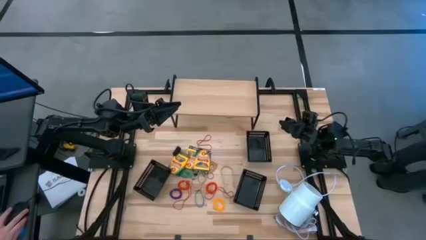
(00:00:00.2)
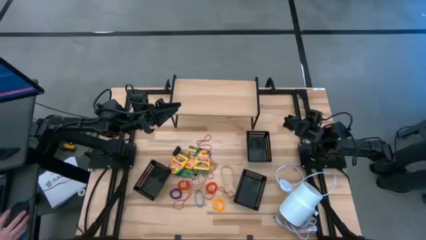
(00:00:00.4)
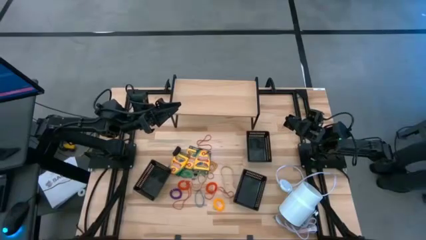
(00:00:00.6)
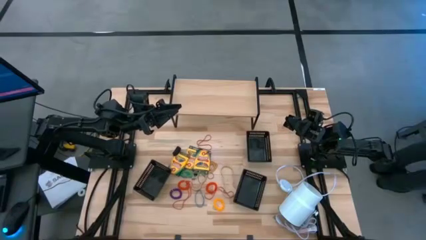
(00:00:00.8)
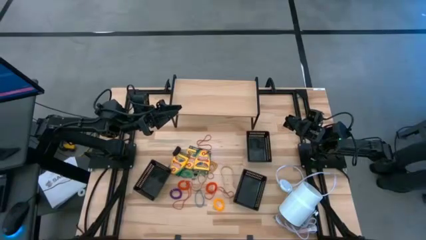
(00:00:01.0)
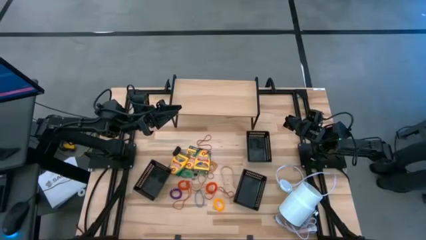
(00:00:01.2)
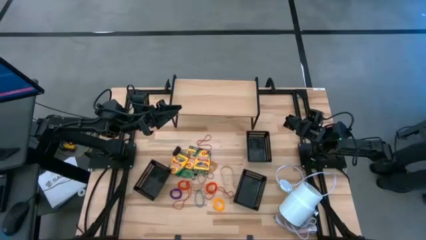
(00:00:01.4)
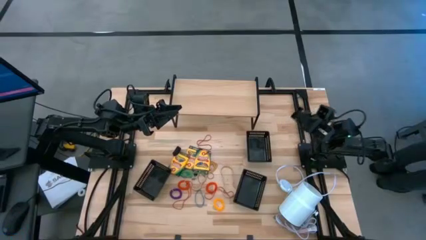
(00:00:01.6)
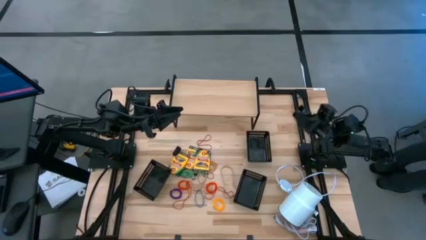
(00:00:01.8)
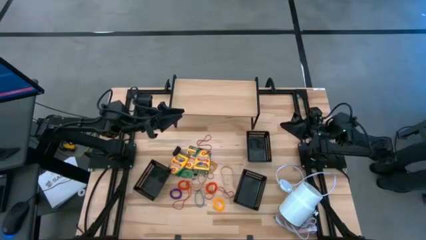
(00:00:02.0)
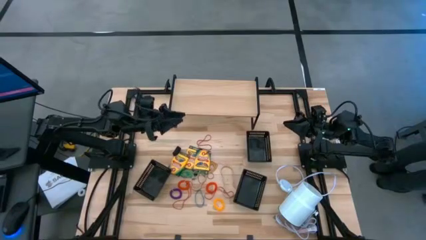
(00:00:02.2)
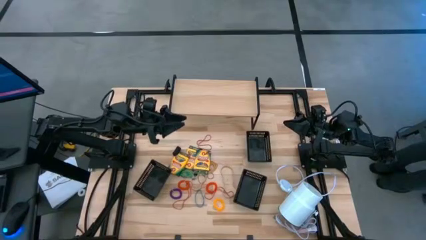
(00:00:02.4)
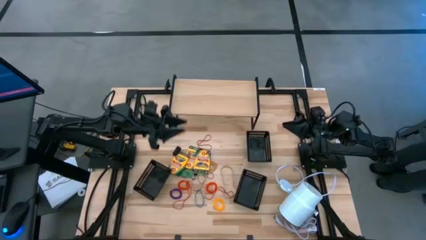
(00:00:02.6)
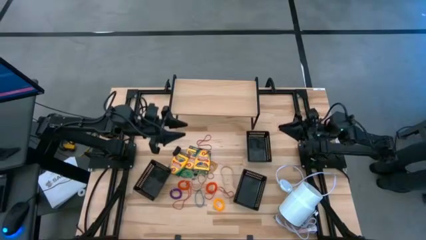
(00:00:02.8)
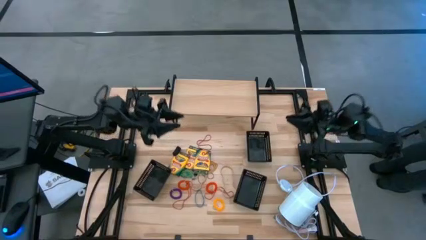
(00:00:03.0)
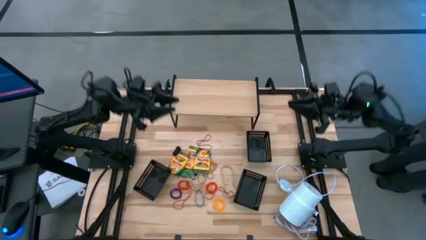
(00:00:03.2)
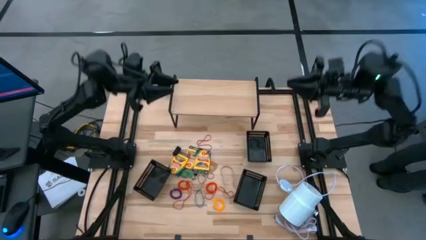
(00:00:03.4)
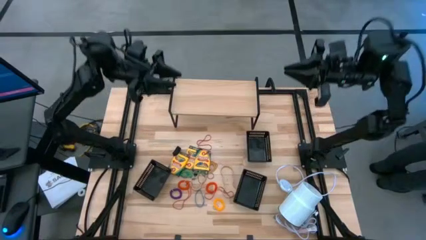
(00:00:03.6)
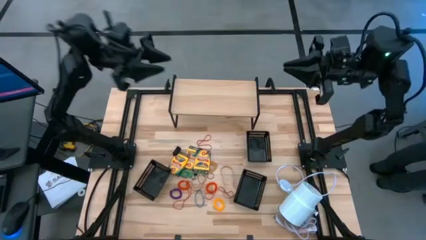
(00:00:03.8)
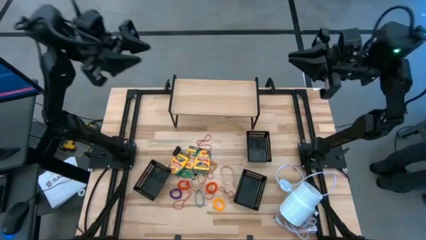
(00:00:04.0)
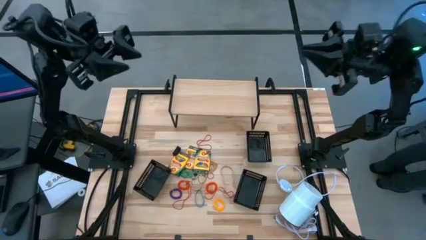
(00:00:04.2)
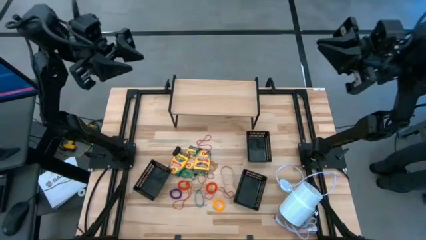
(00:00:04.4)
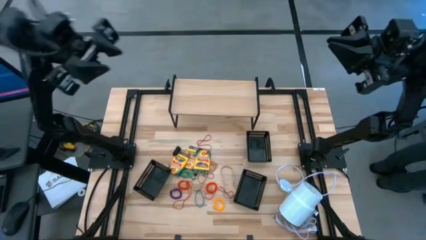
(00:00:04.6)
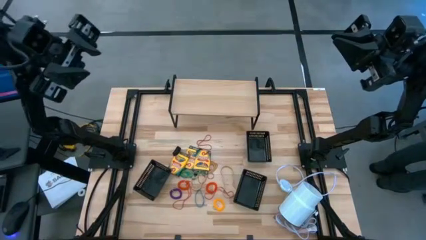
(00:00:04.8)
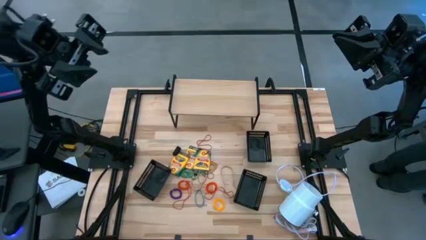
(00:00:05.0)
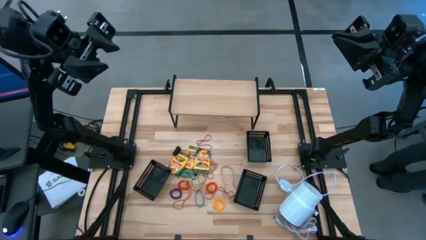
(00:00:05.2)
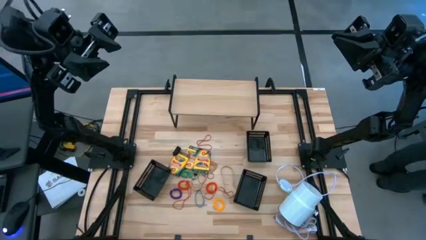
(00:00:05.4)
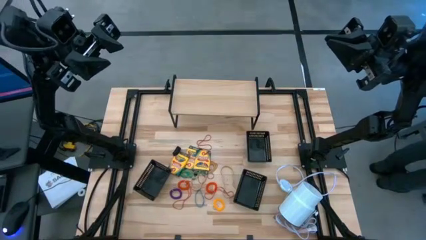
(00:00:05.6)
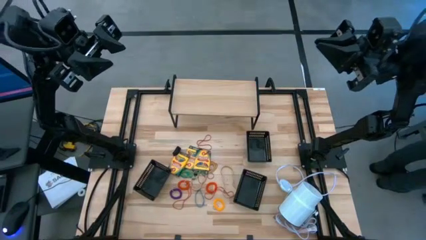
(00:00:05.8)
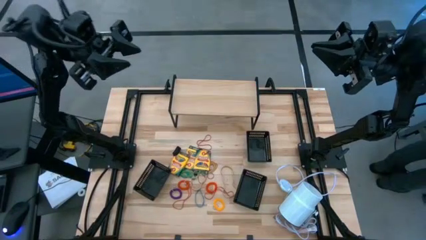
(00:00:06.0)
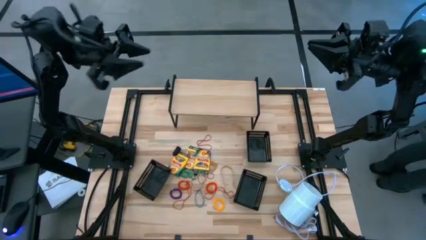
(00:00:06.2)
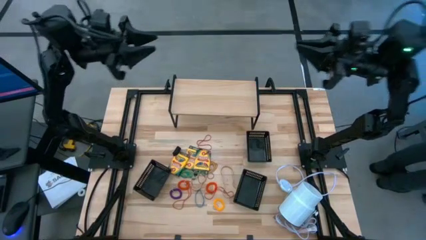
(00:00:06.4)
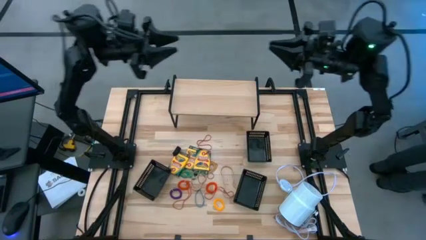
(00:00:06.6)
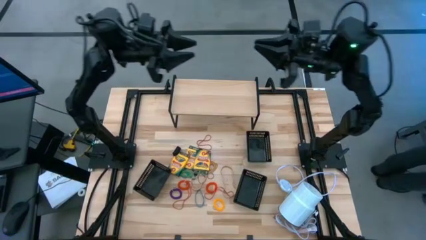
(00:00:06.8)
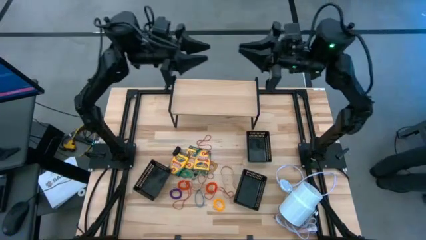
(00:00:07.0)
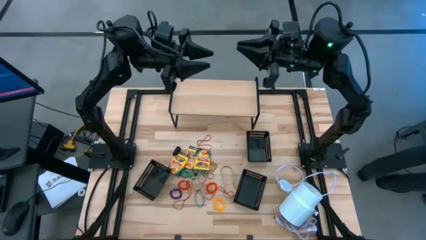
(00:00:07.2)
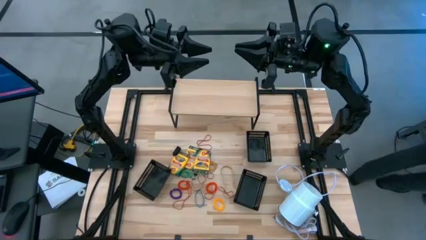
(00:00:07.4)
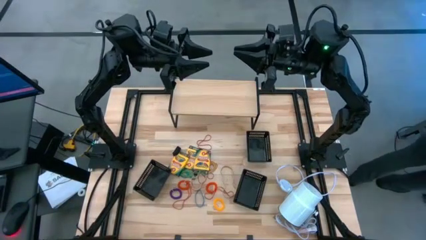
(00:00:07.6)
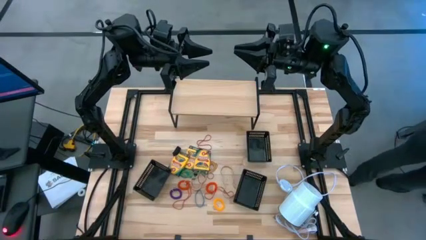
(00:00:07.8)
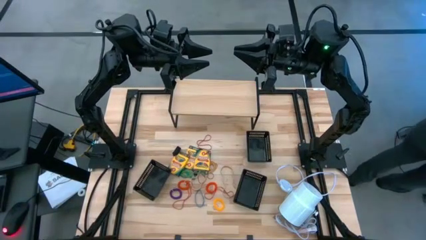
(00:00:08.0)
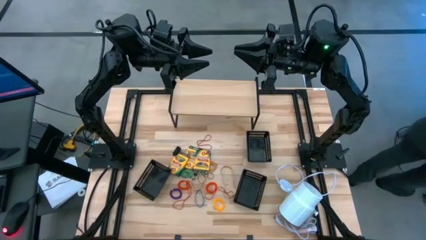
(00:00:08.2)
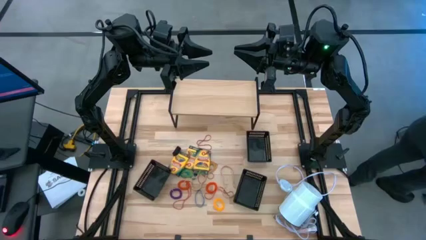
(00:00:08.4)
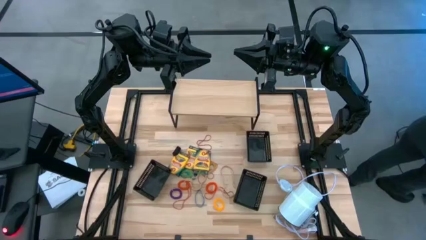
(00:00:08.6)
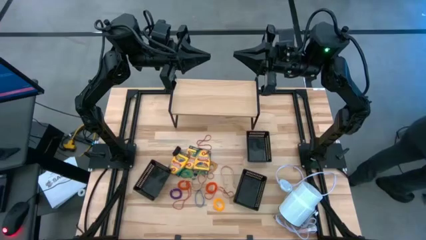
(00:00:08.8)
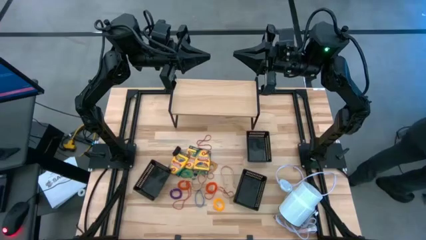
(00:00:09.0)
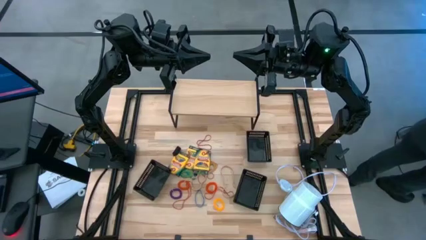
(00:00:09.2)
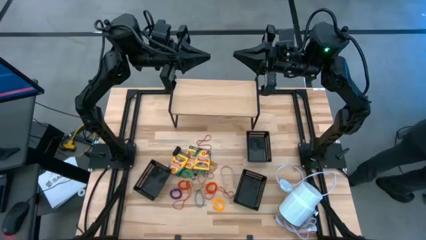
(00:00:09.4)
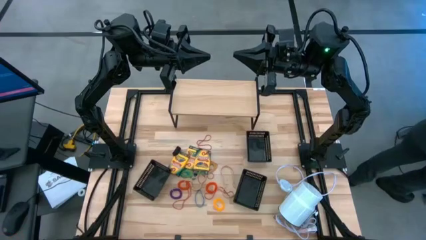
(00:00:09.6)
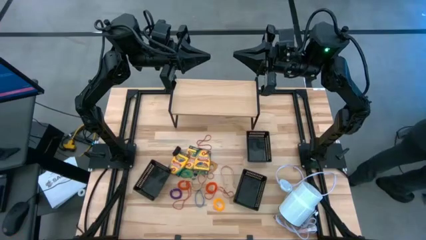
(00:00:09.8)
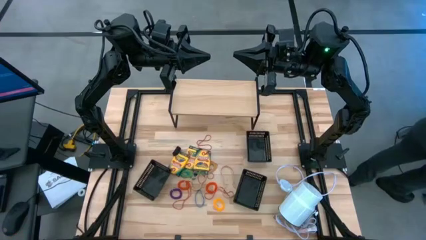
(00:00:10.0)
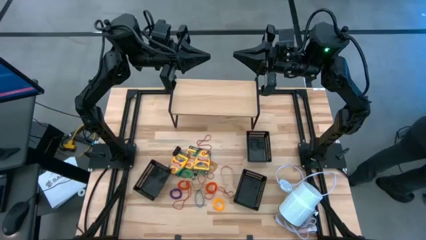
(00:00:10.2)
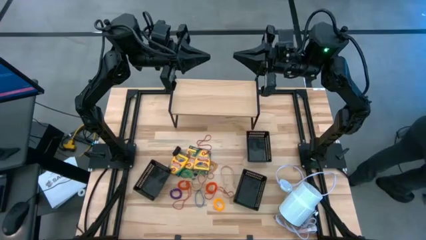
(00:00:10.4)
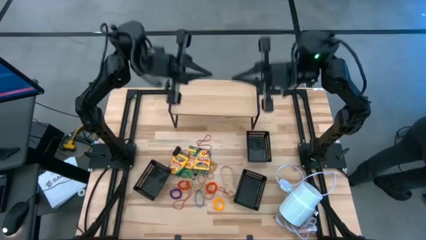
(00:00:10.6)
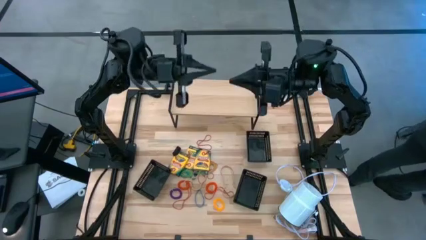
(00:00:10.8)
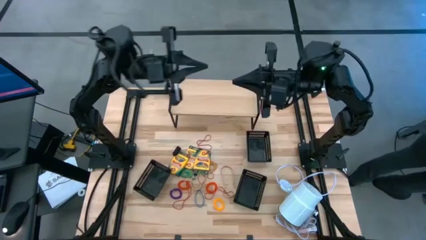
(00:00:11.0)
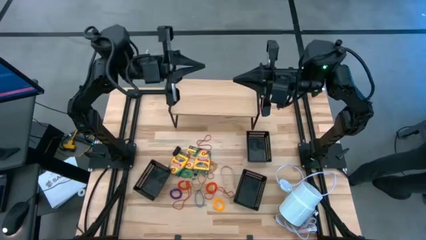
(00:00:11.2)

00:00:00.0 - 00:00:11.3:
Task: Pick & Place Office Desk Supplies
Put the black rubber band into the top right black bin
